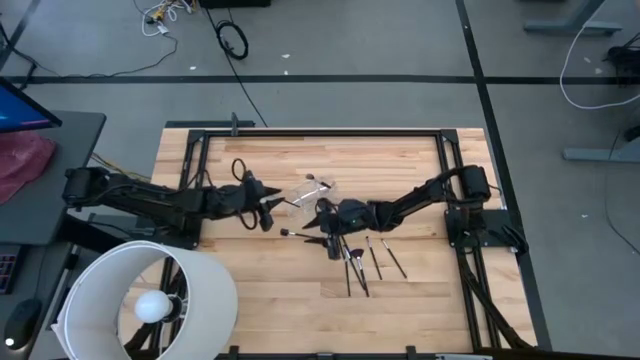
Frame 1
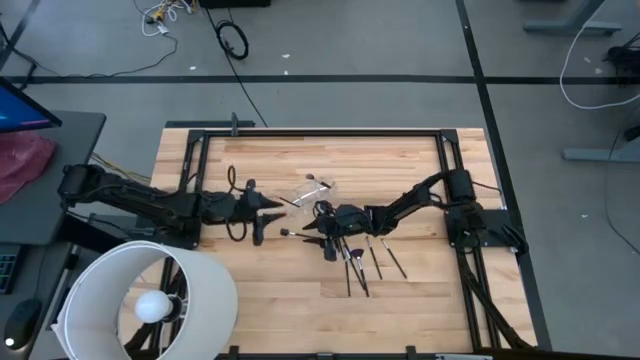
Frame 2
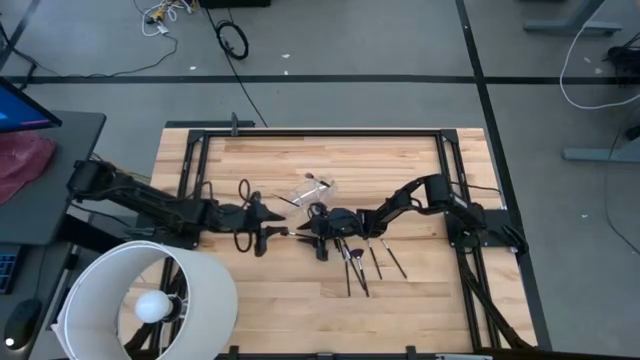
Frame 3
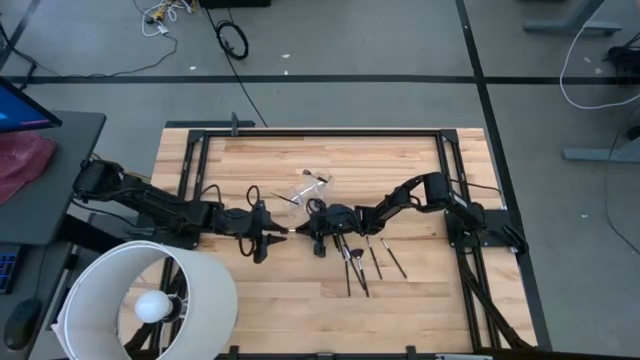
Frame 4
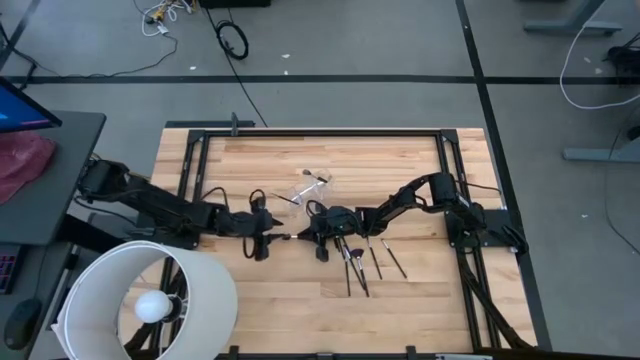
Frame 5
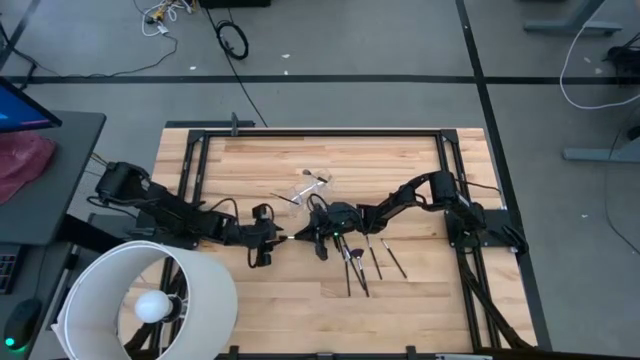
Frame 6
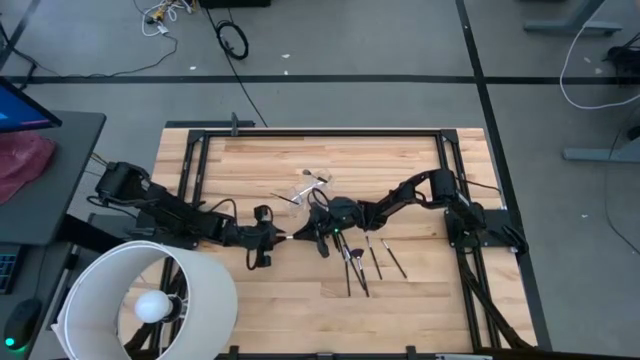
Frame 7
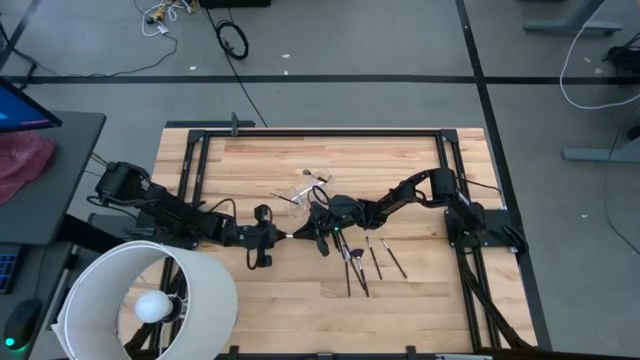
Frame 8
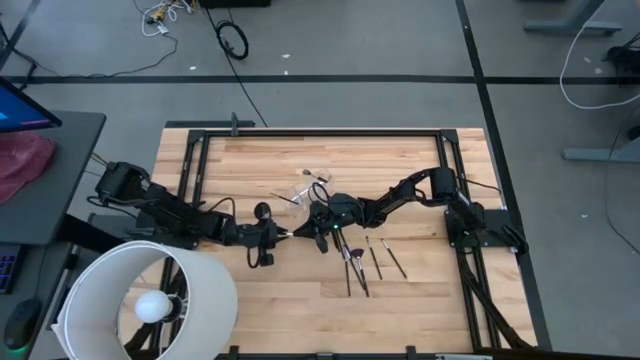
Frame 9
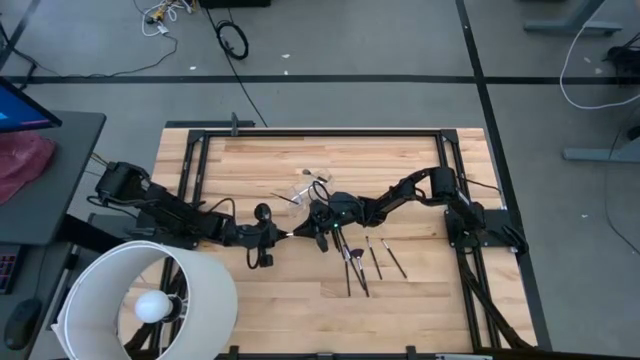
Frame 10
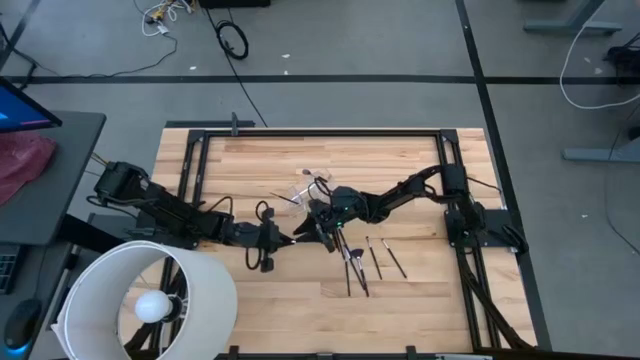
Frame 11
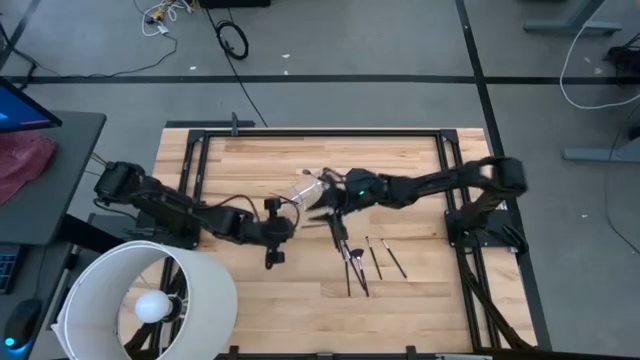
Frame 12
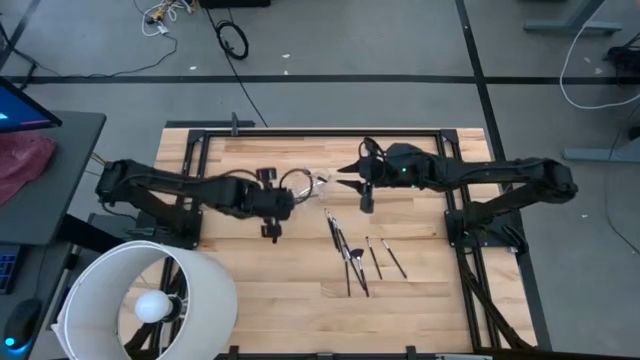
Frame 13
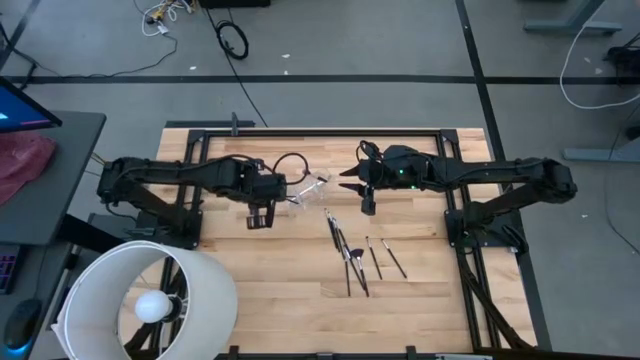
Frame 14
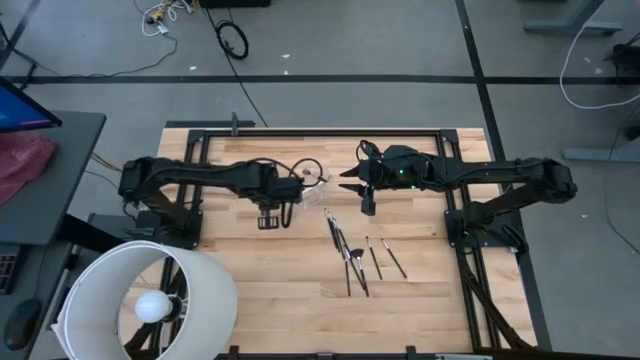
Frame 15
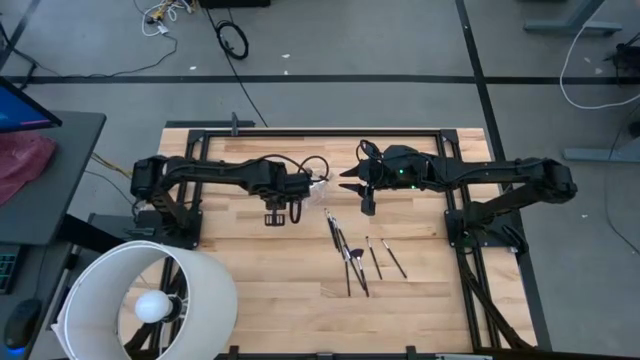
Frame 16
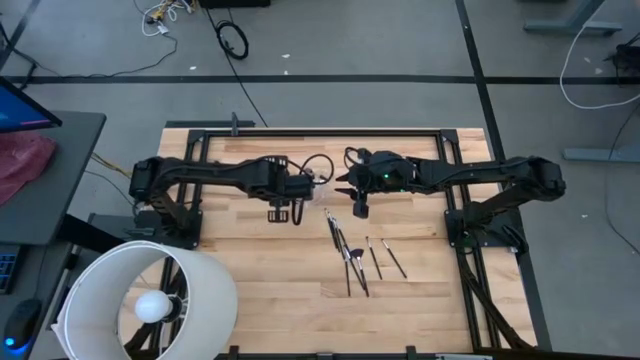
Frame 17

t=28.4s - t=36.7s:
Task: Put items in baskets/containers
Put the black brow brush into the transparent organizer

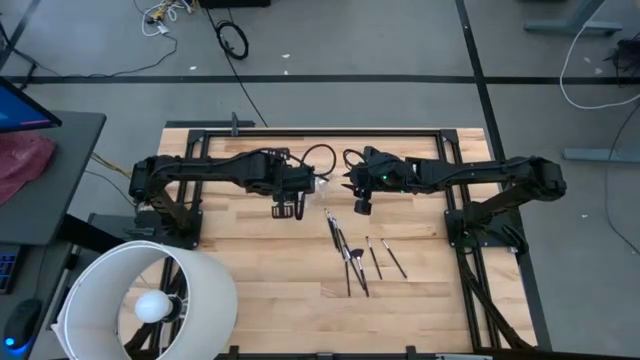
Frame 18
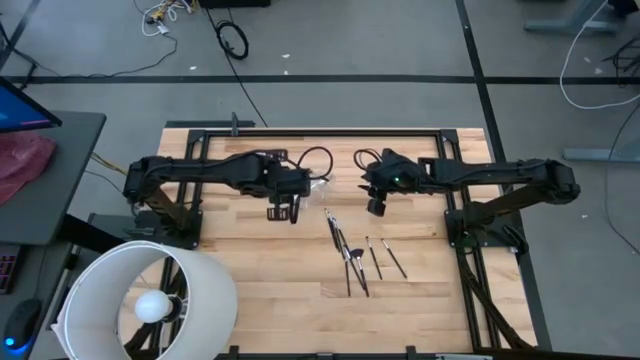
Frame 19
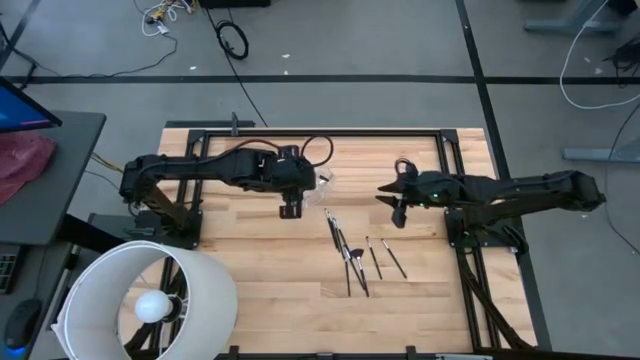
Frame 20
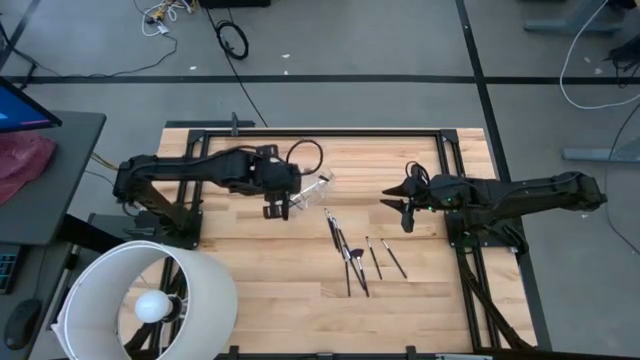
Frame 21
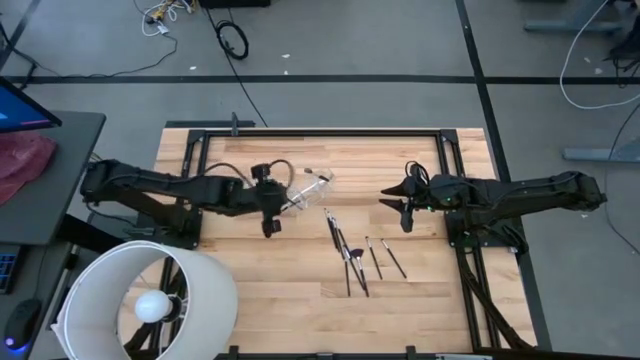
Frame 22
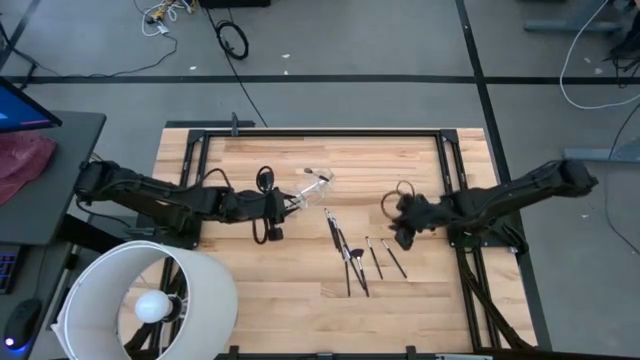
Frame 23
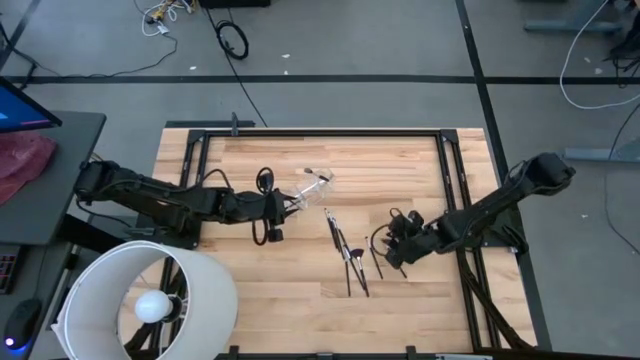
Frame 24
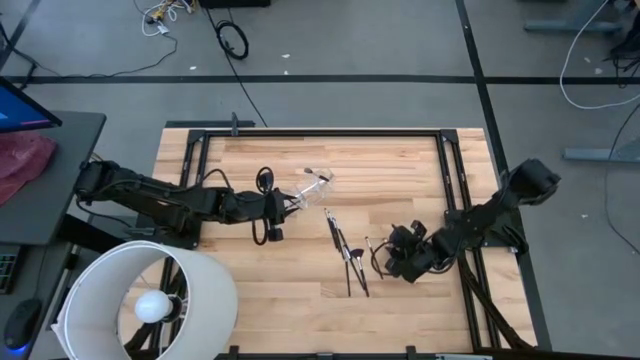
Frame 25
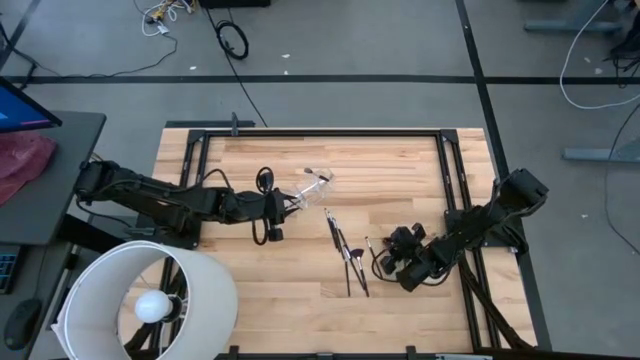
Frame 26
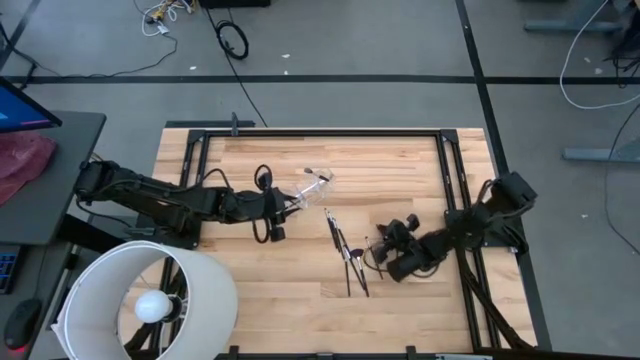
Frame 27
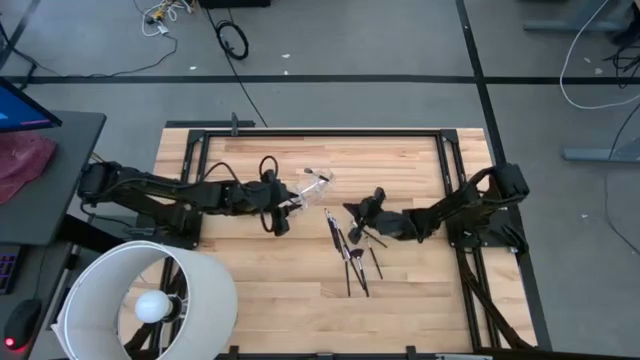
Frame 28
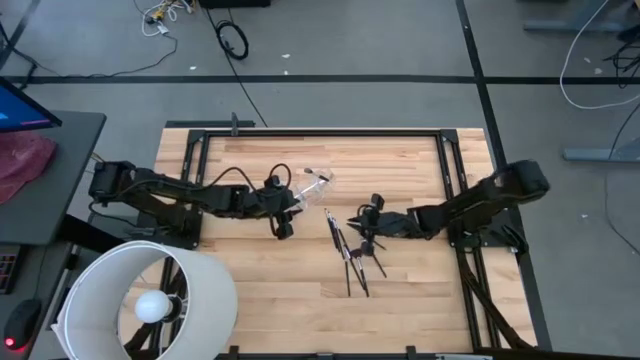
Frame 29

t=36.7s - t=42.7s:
Put the black eyeshadow brush into the transparent organizer

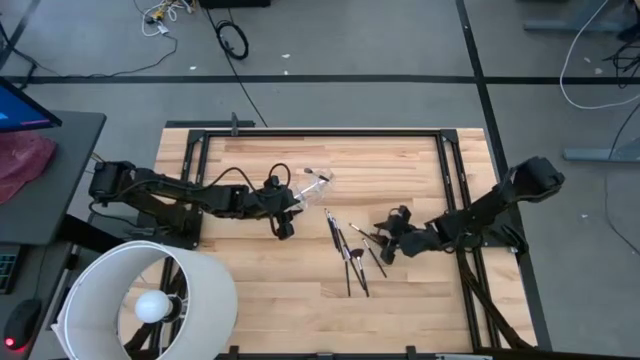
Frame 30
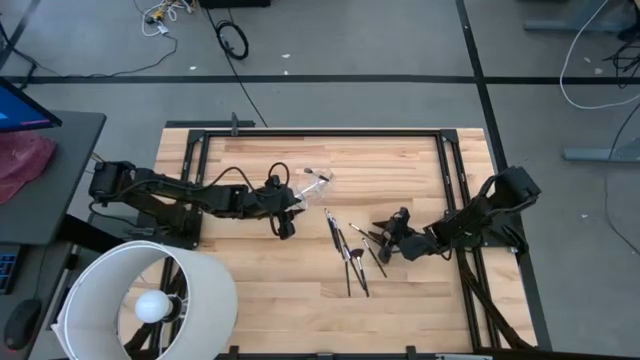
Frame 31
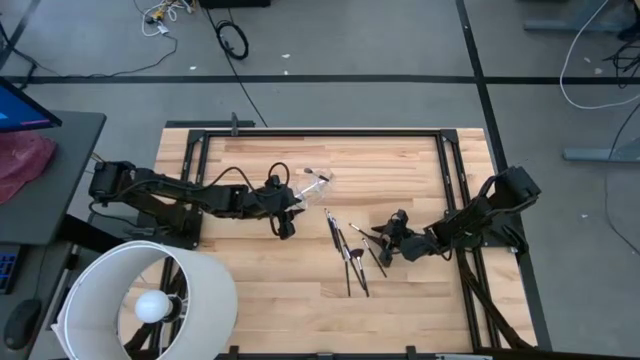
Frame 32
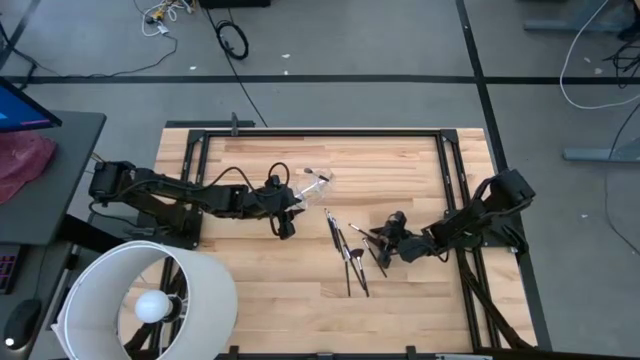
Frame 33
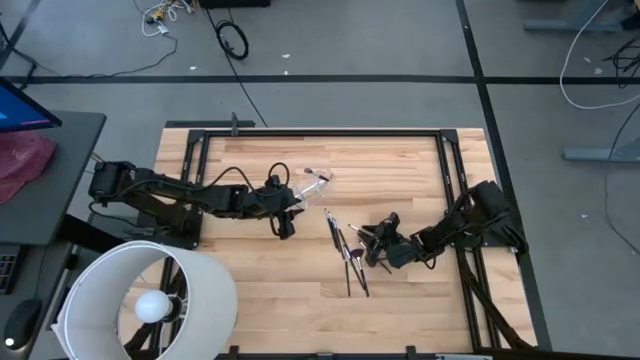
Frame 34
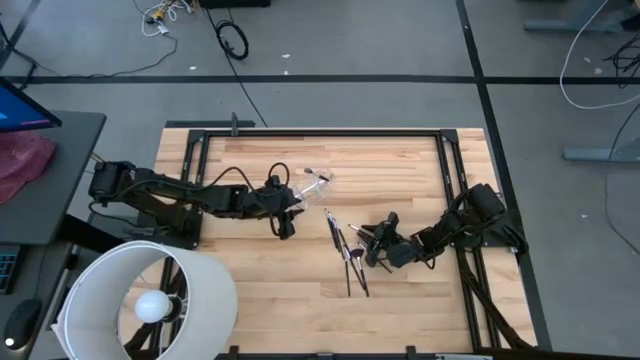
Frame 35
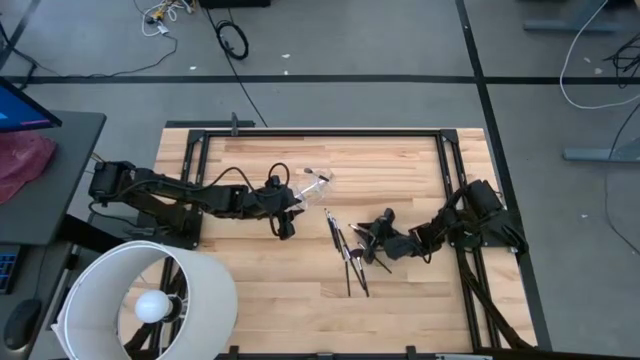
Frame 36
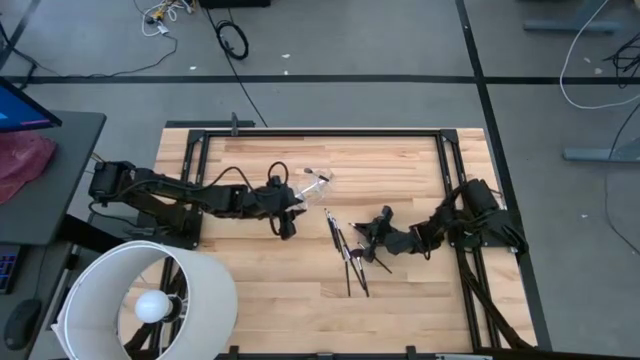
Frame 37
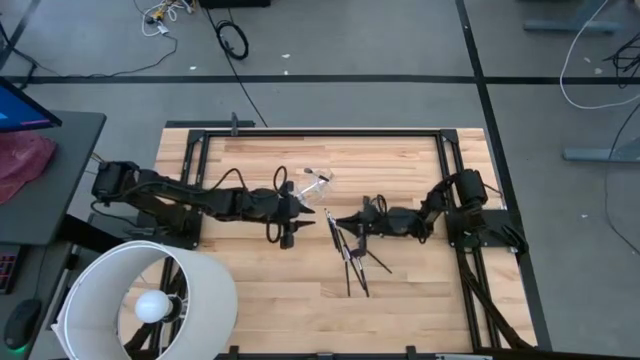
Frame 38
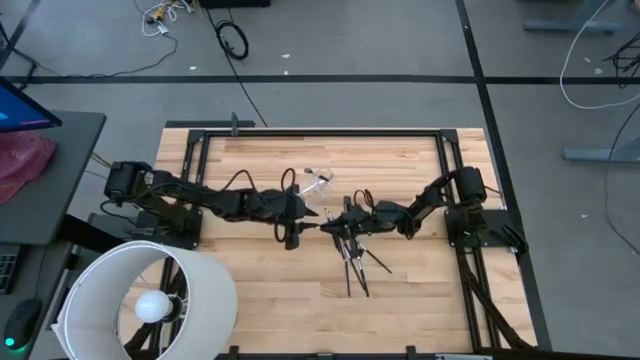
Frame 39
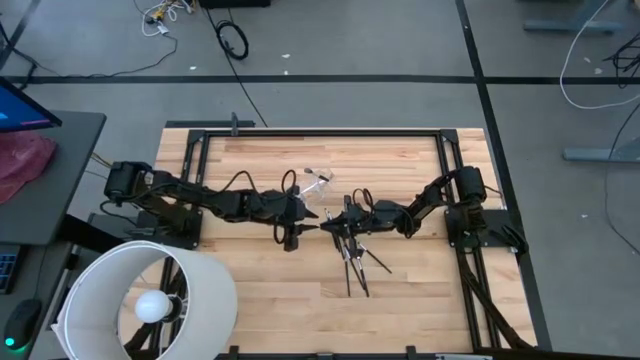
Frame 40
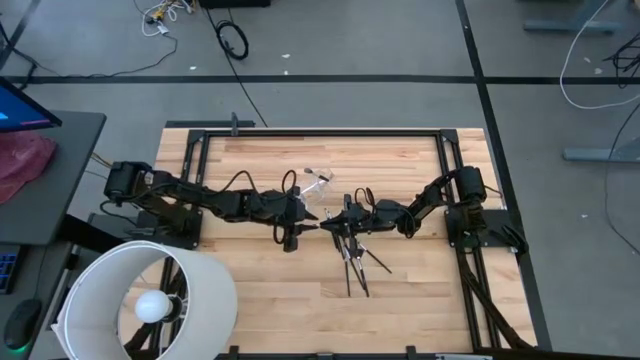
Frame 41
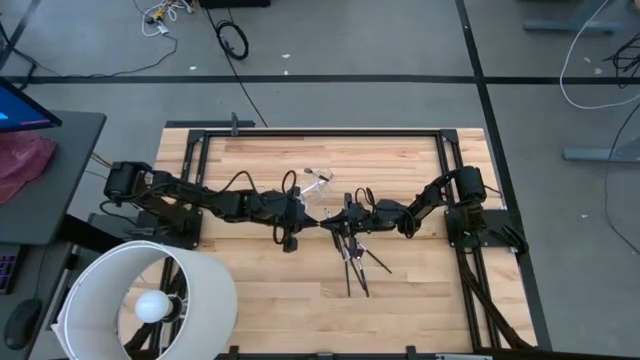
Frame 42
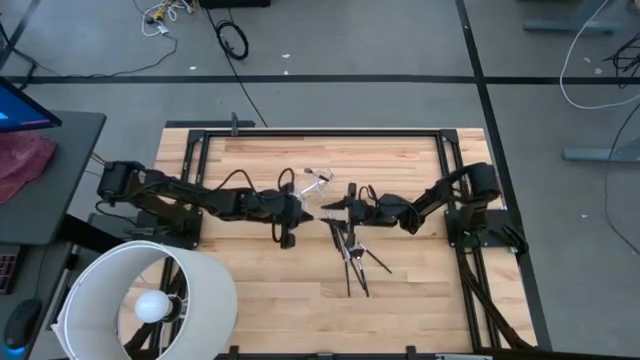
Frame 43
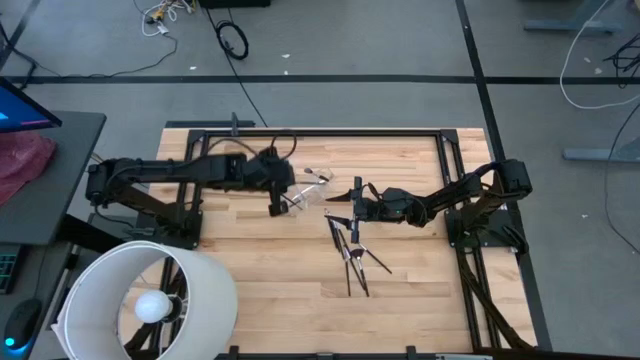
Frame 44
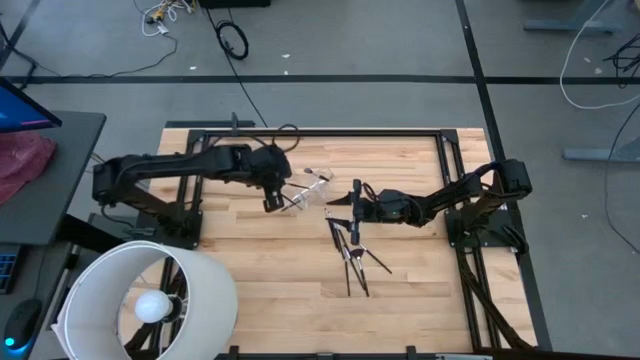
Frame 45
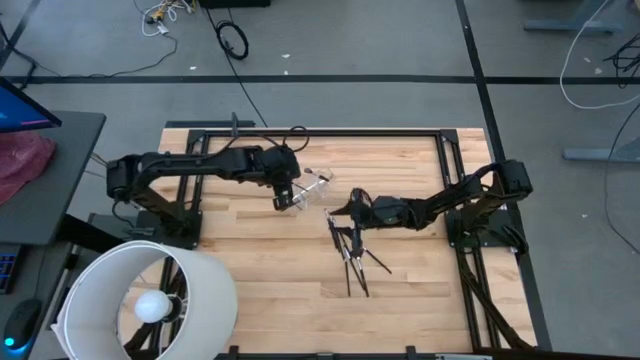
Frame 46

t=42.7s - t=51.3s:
Put the black eyeshadow brush into the transparent organizer
